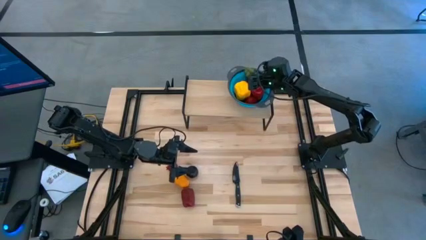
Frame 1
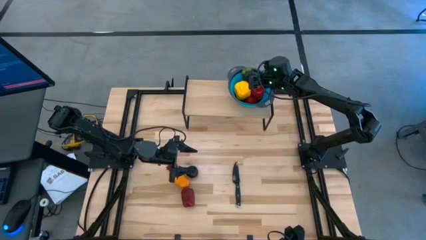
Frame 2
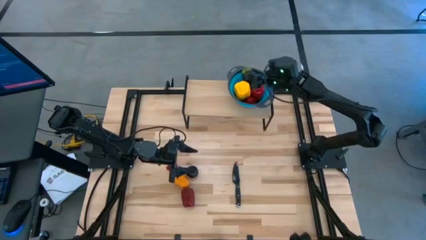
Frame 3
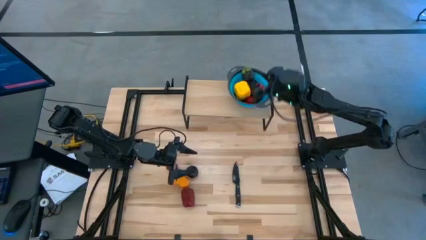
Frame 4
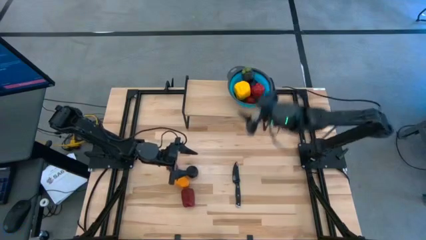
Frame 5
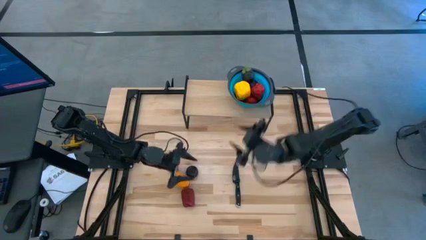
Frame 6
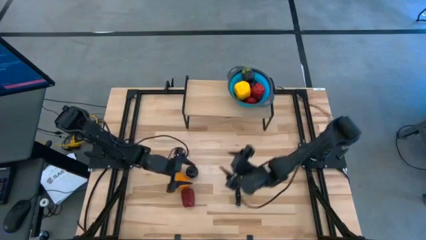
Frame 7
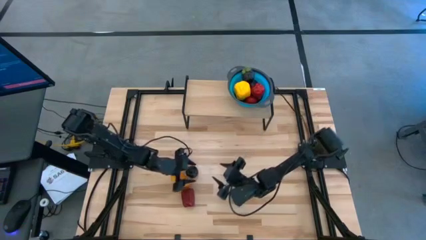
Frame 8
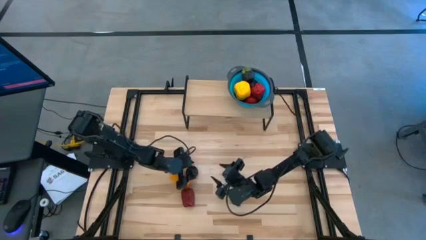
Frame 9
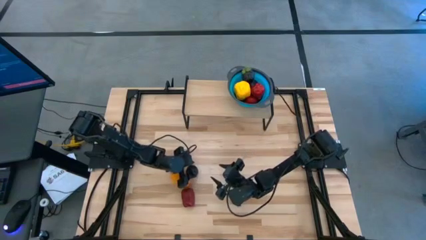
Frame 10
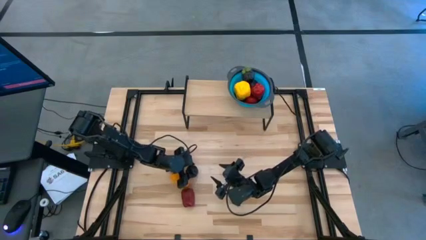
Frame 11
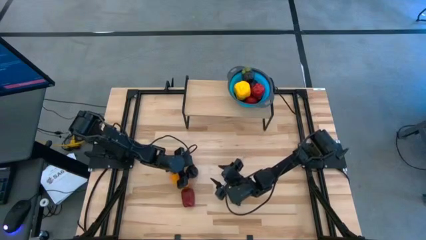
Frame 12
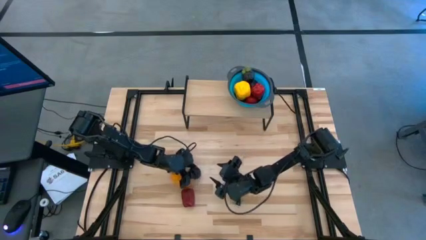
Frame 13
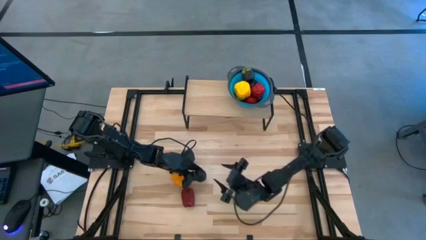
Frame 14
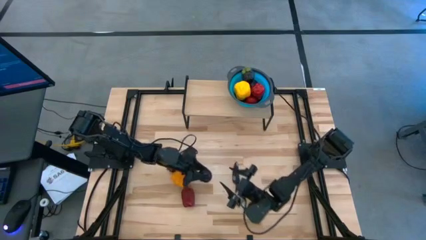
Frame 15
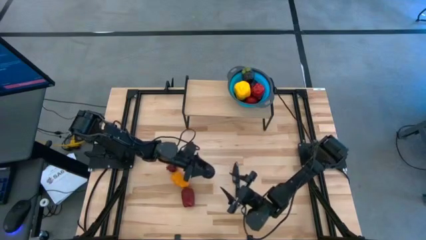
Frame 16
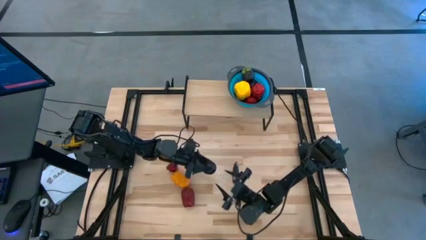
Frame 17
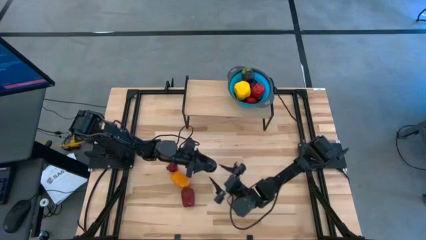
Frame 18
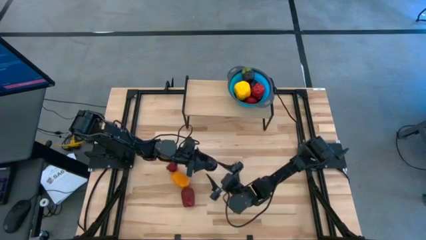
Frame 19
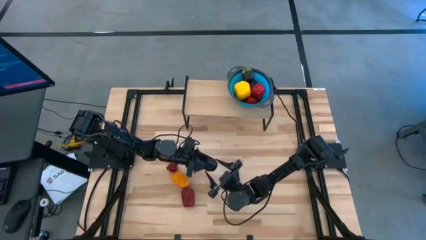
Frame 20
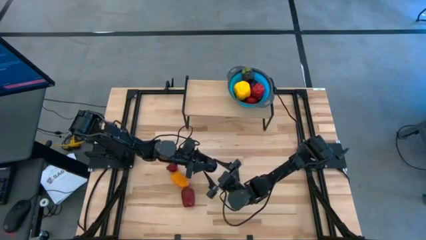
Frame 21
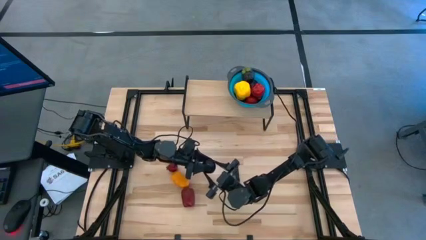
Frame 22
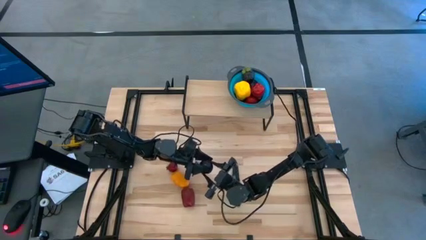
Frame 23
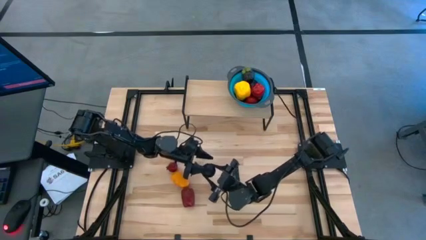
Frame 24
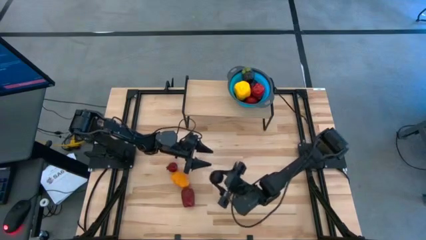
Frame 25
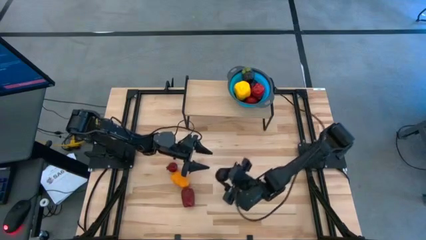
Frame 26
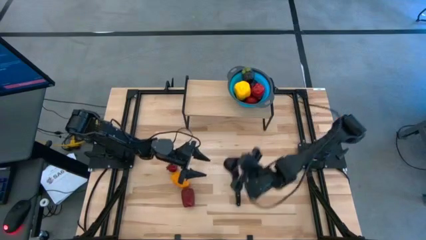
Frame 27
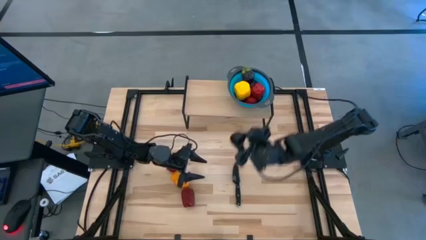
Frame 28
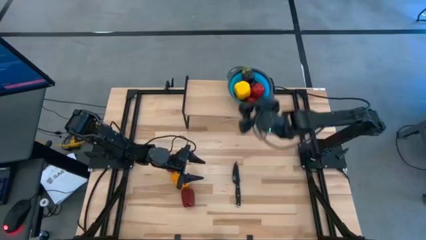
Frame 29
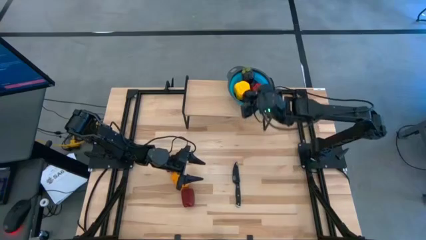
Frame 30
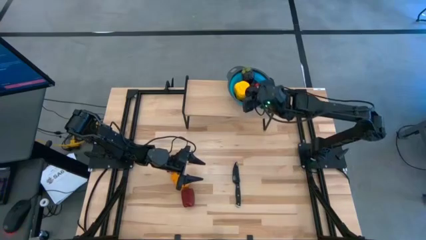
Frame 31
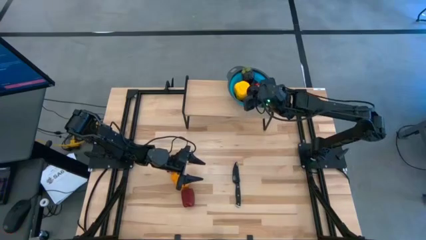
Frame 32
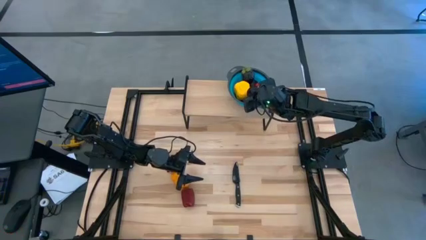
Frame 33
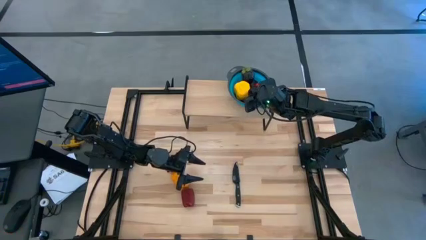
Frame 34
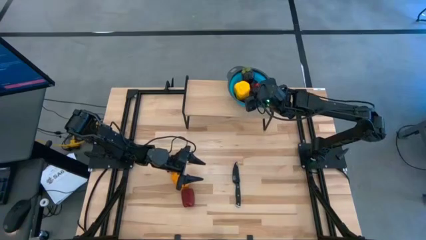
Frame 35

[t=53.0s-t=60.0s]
Task: Pick & Place Fruit
Put the black plum into the blue strainer bowl on the shelf

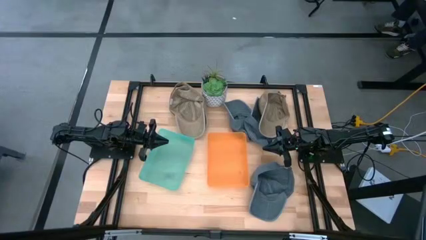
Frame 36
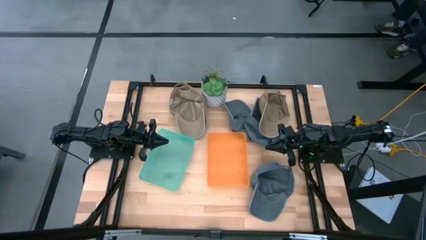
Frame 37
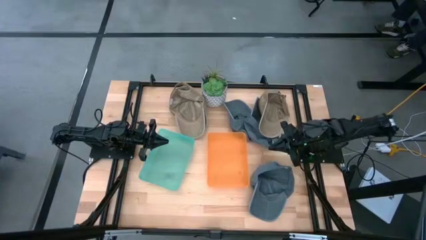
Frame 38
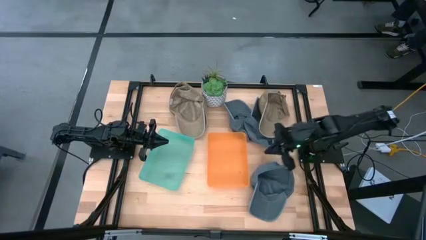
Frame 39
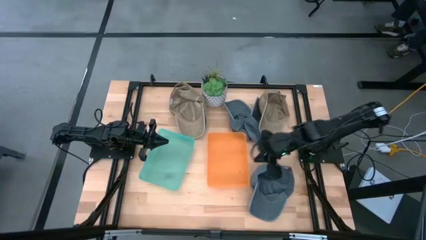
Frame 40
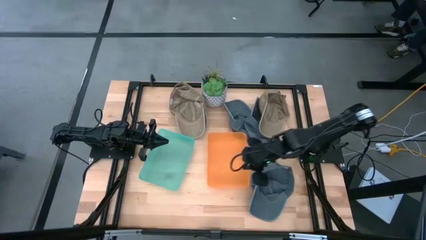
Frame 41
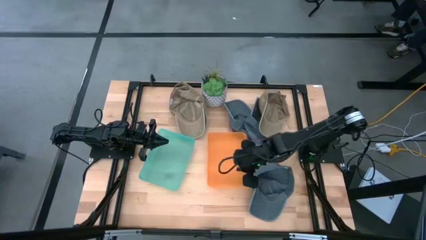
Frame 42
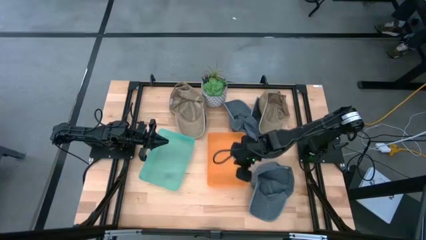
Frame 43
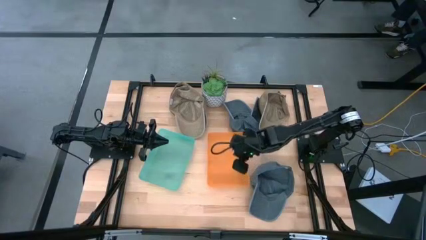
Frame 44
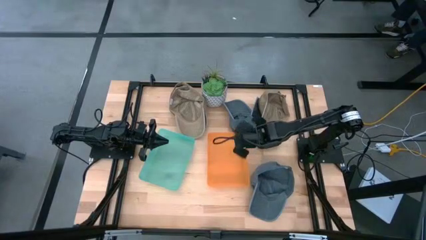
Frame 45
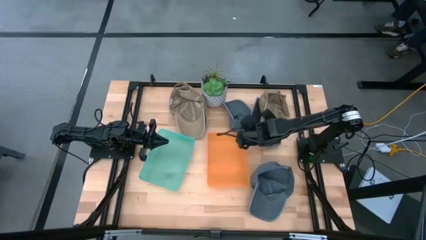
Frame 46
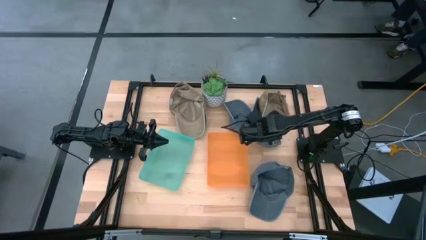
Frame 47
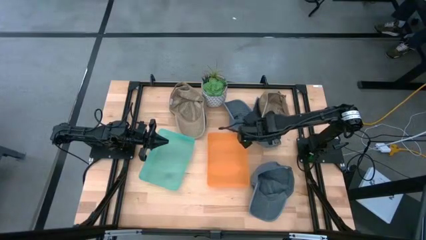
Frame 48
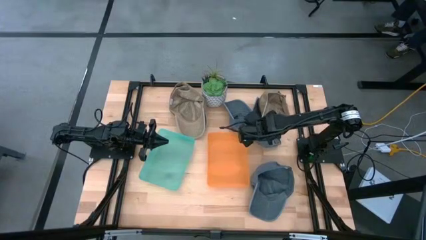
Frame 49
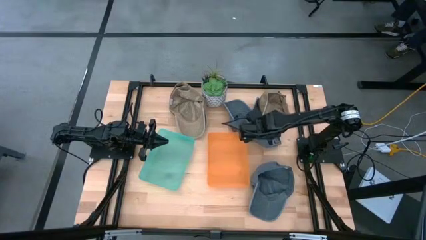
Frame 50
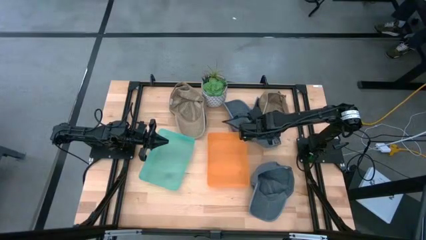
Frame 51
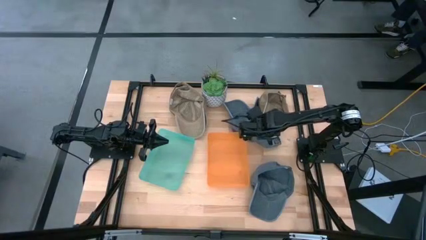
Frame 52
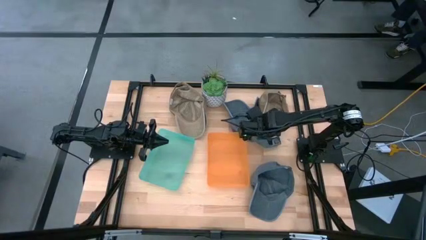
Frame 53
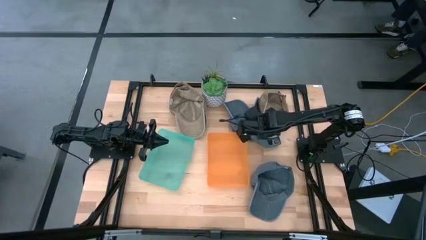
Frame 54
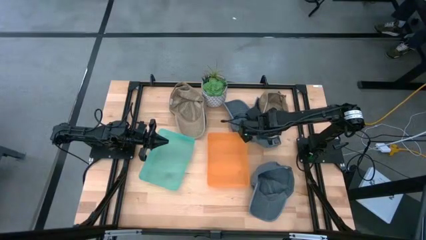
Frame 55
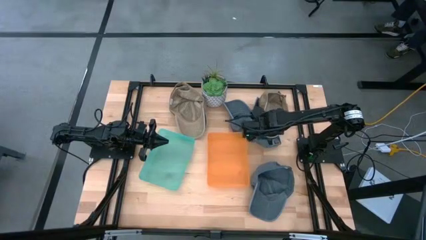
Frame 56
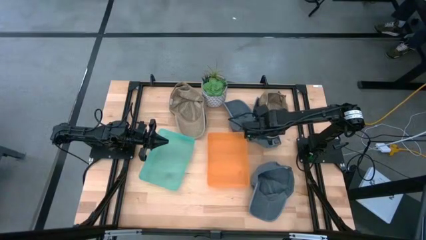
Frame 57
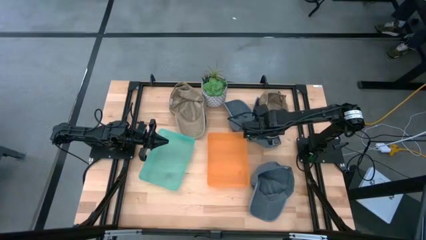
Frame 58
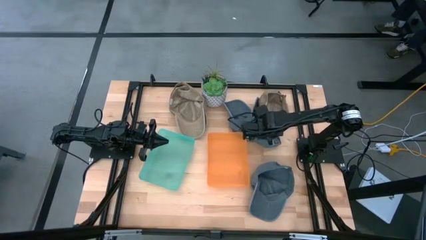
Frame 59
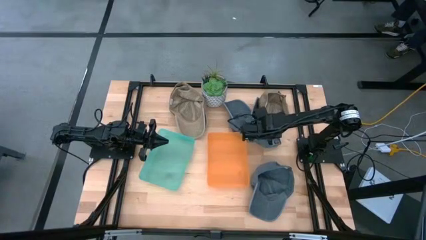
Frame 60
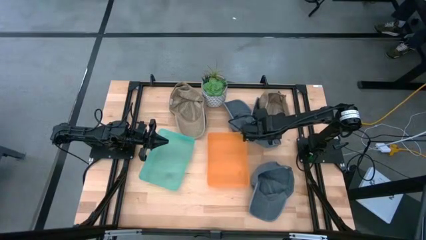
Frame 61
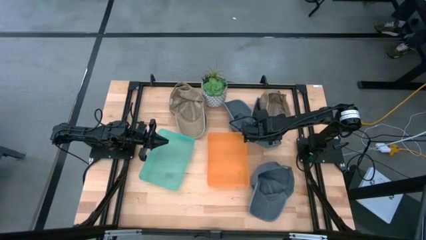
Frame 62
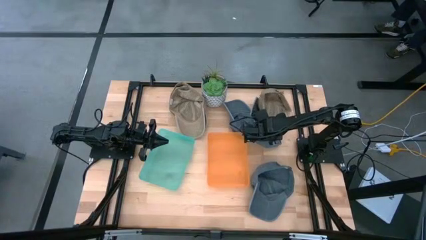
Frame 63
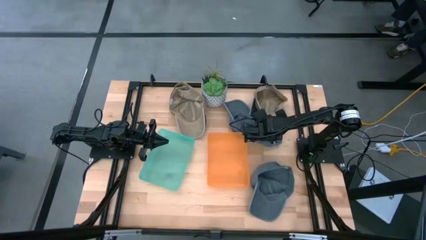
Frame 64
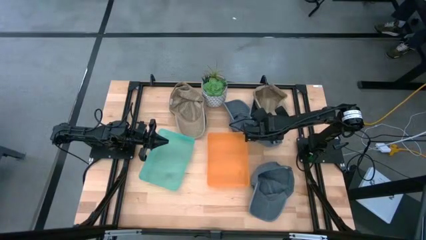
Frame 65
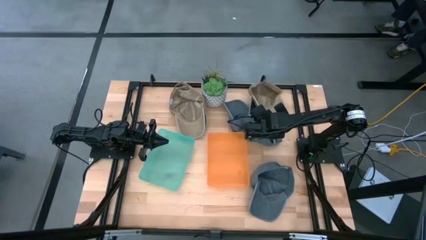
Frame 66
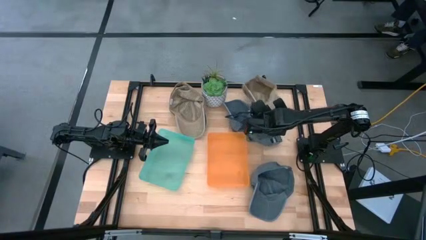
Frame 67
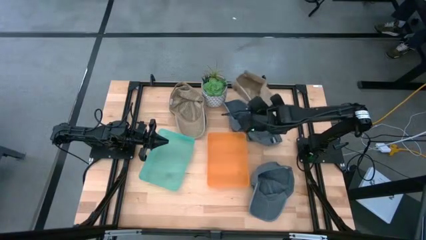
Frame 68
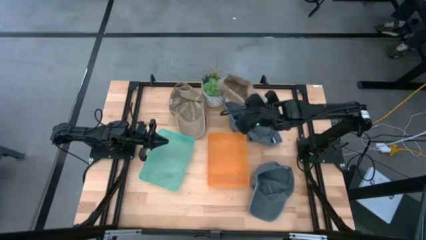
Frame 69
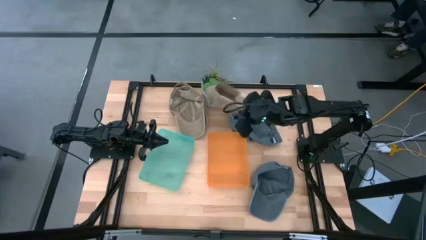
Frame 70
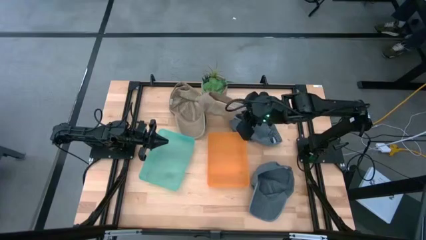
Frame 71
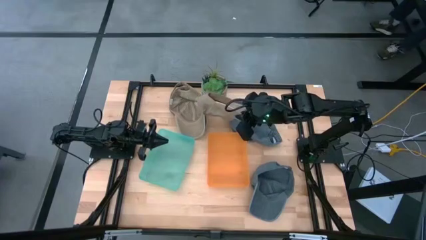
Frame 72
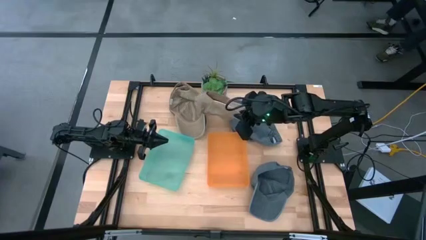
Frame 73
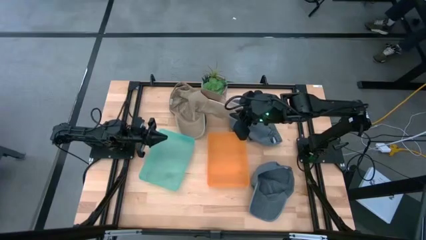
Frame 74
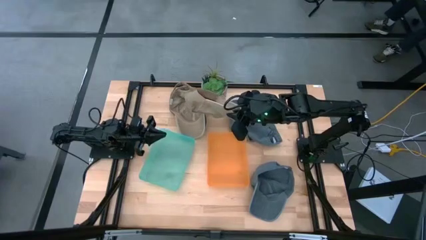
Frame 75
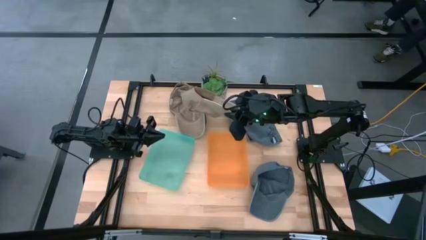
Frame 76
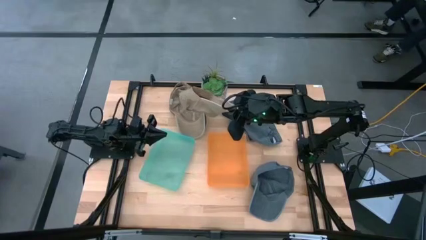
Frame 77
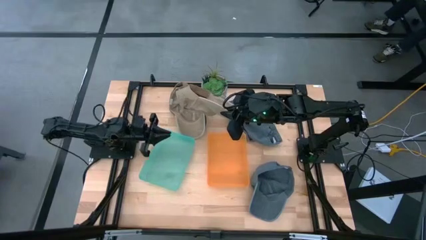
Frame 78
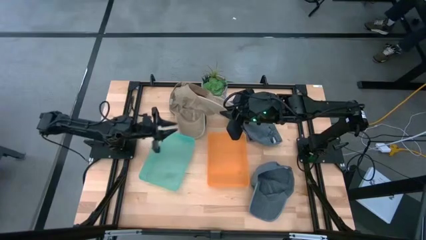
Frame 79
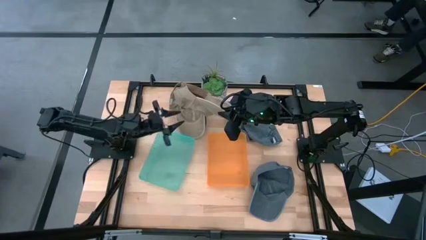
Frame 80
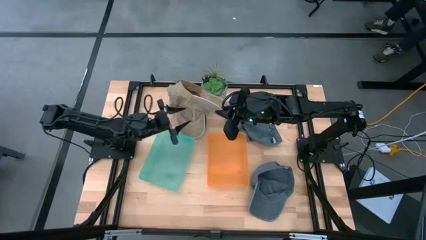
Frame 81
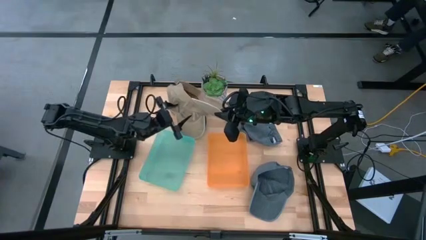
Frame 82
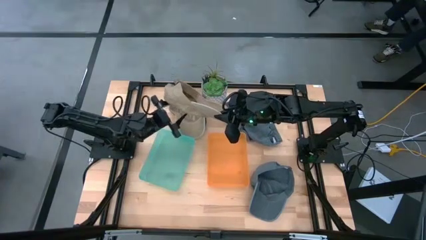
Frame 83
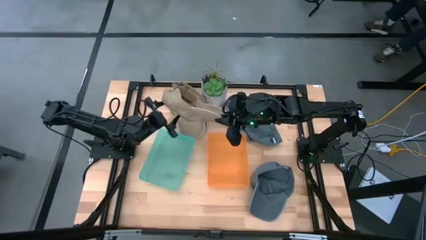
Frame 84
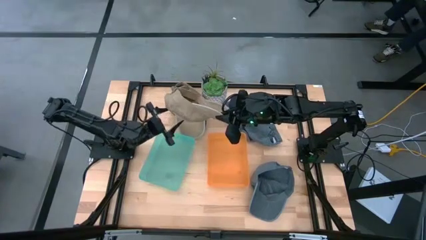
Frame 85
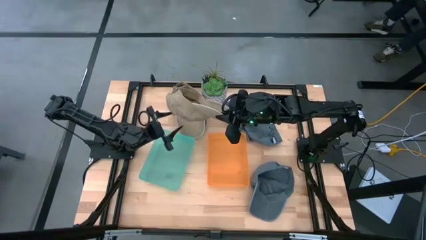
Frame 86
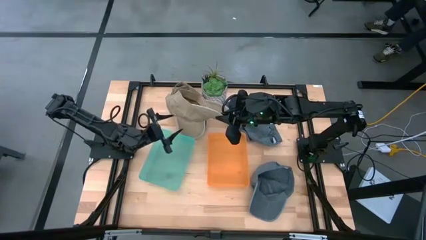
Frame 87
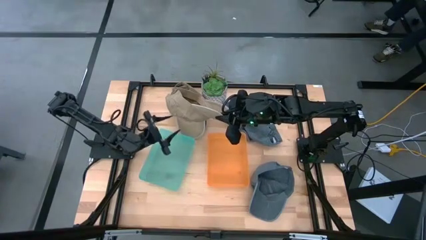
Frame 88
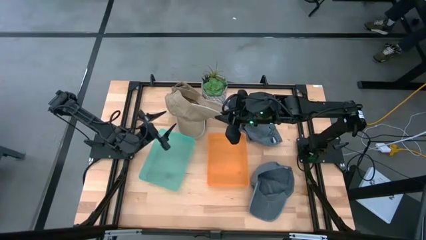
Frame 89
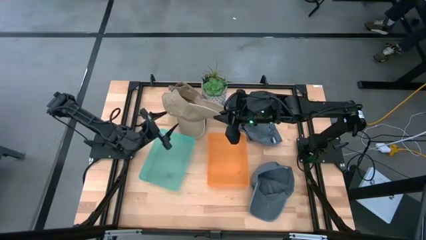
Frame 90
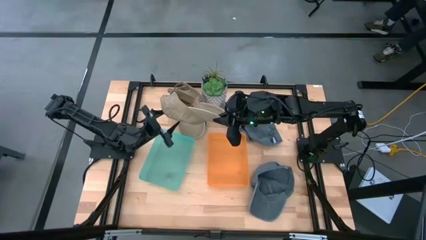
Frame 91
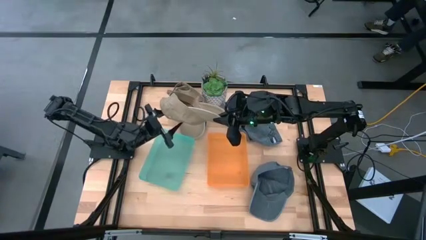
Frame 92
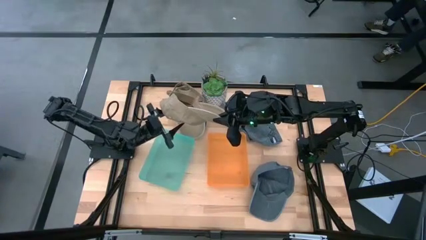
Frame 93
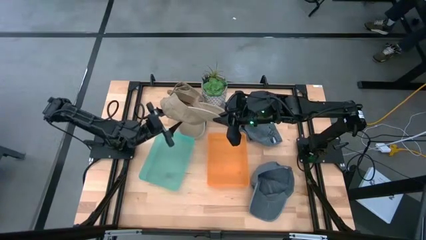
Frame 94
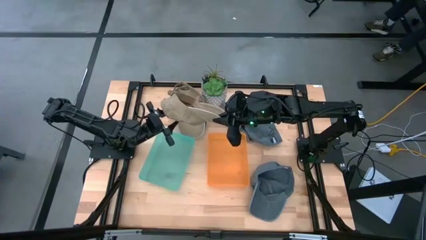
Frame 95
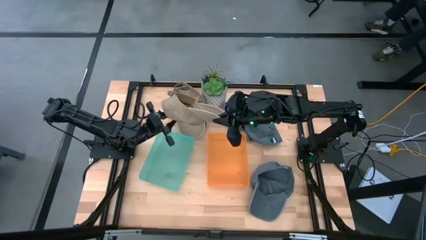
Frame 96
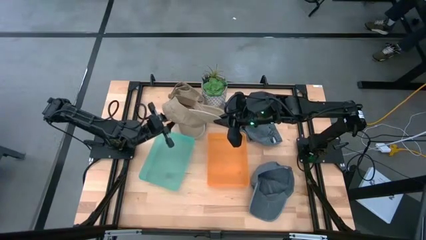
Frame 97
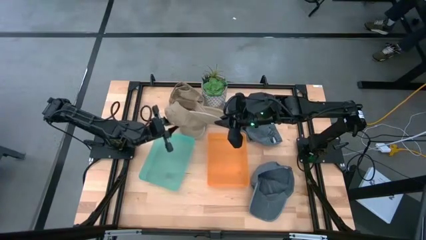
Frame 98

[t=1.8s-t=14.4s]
Task: Pick & Place hat
Put the right brown cap into the orange bin
